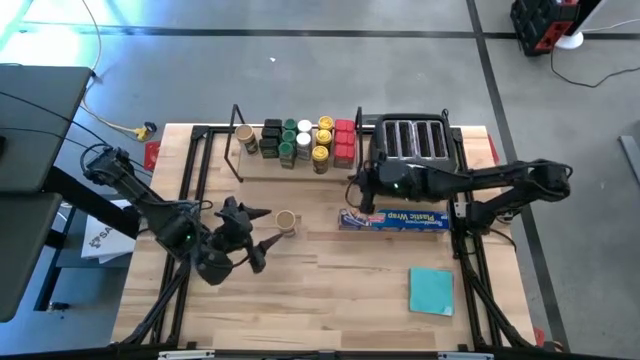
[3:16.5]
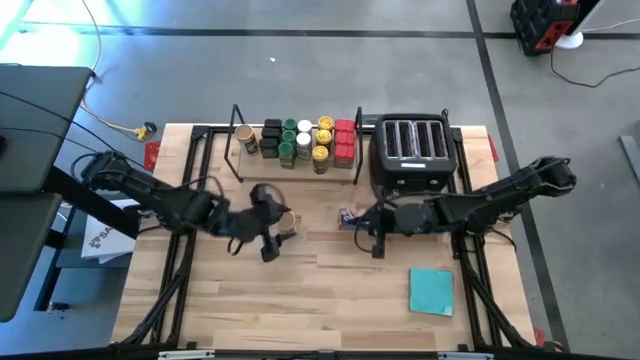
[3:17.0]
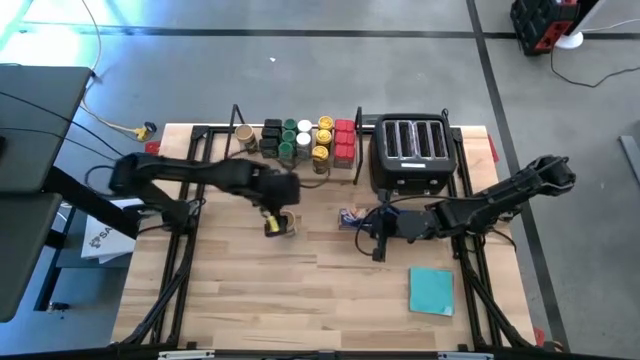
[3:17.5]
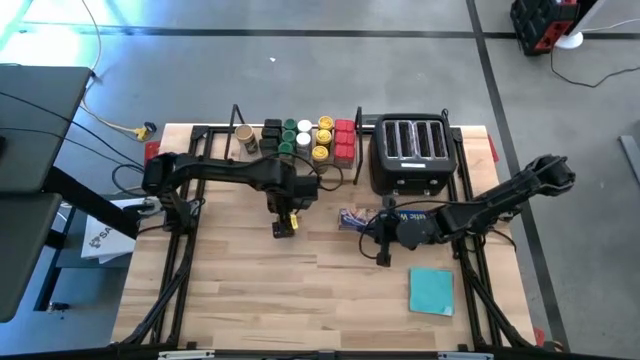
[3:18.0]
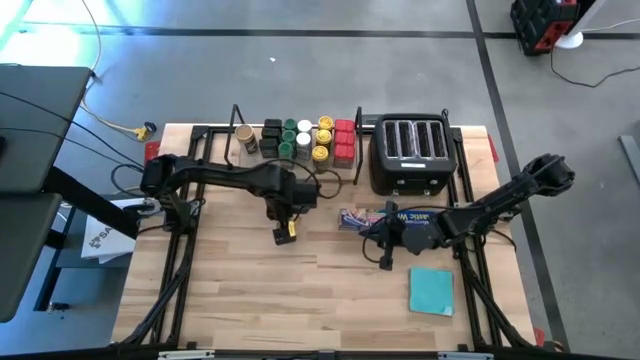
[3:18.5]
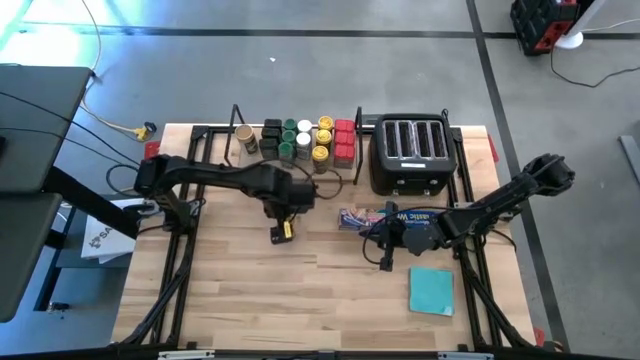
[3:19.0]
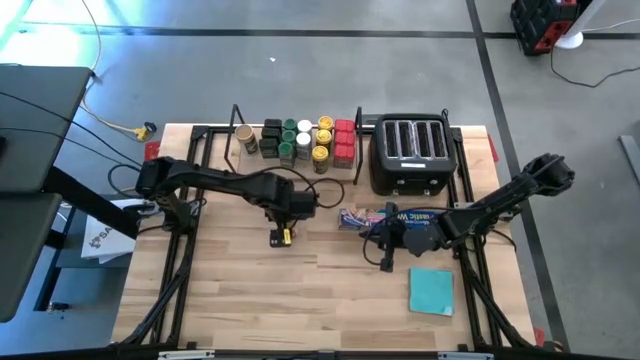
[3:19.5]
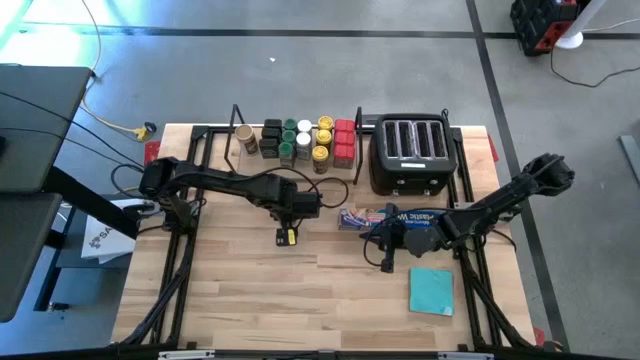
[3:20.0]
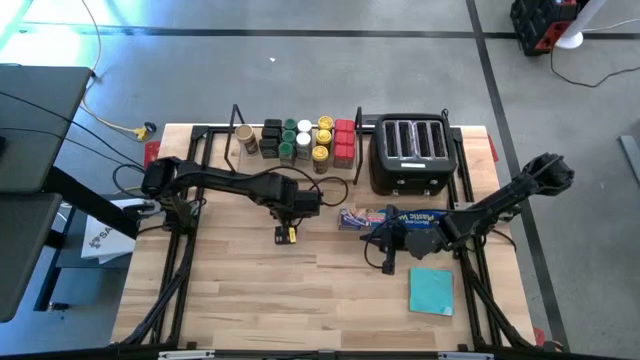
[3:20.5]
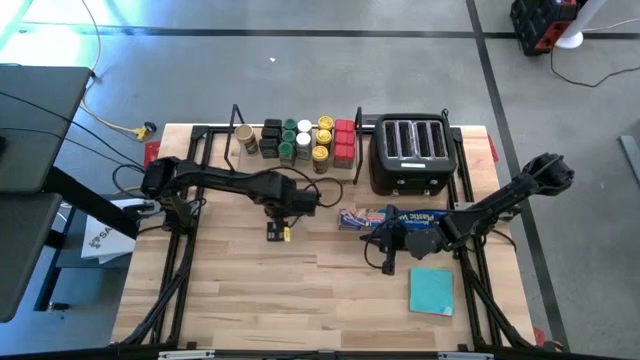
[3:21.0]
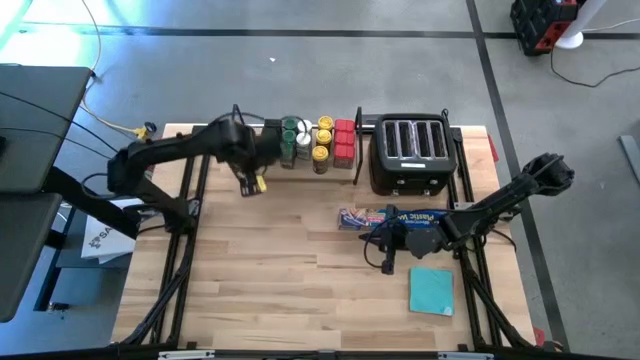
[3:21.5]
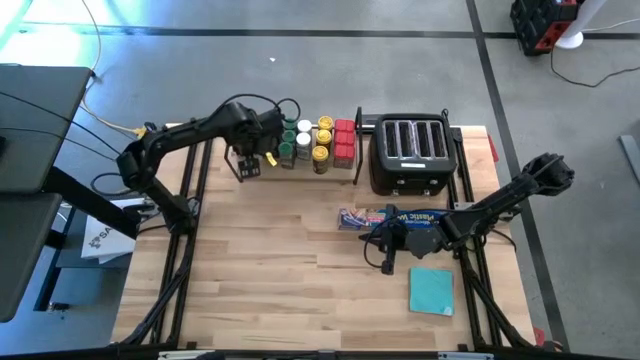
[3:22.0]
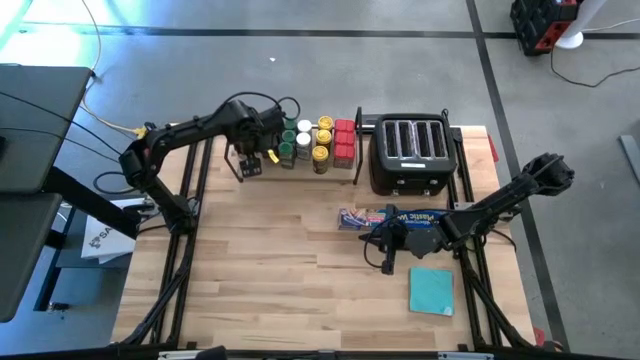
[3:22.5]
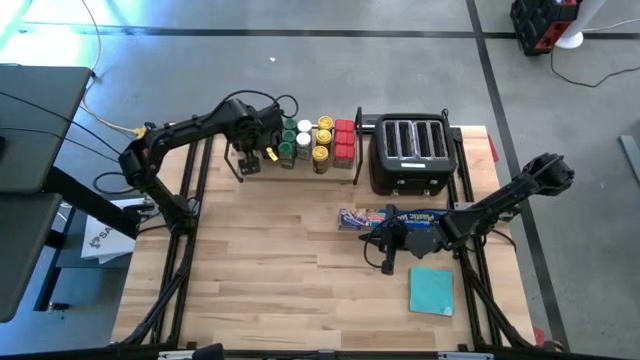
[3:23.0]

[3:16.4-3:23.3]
Task: Shelf spices
Put the gold seasoning bottle on the shelf aligned with the other gold seasoning bottles

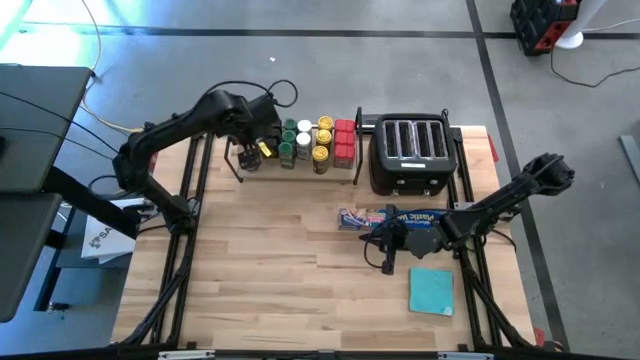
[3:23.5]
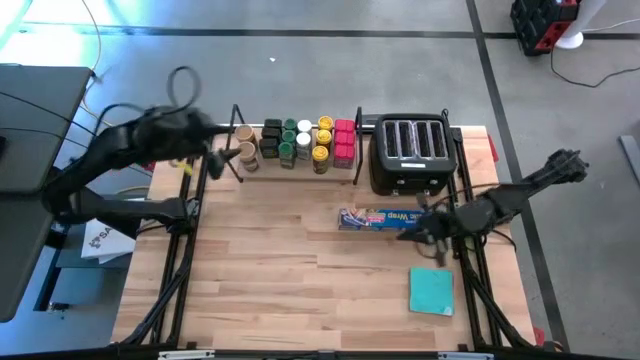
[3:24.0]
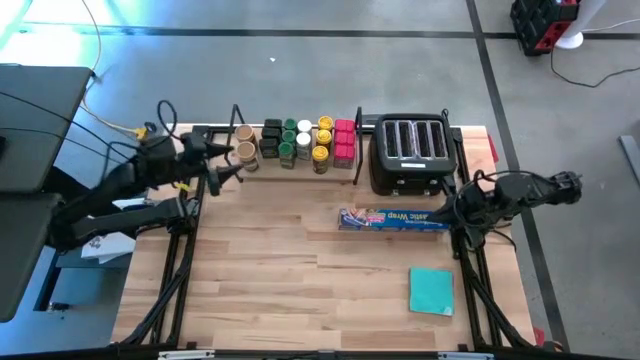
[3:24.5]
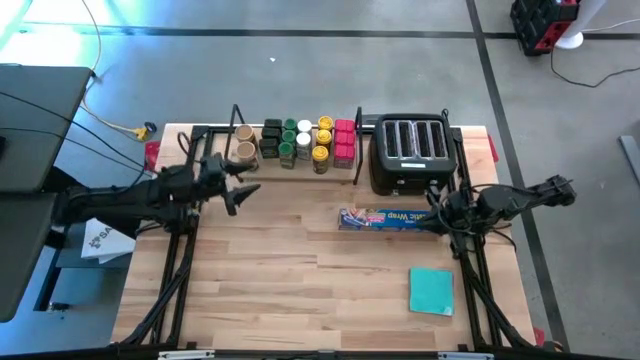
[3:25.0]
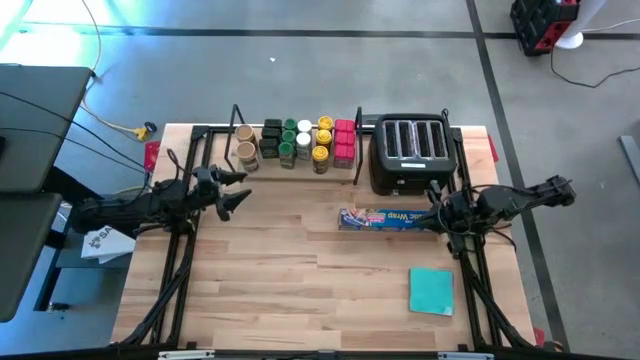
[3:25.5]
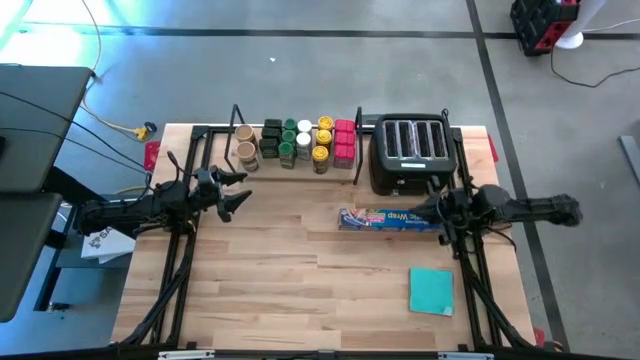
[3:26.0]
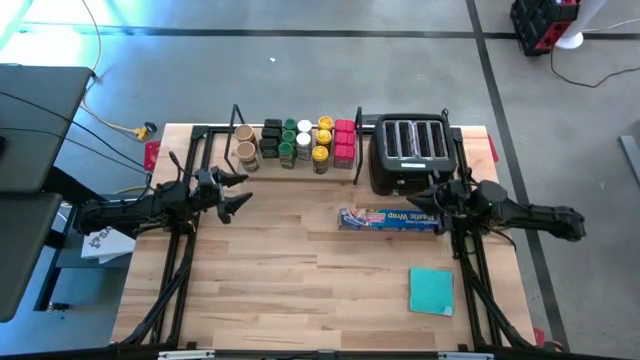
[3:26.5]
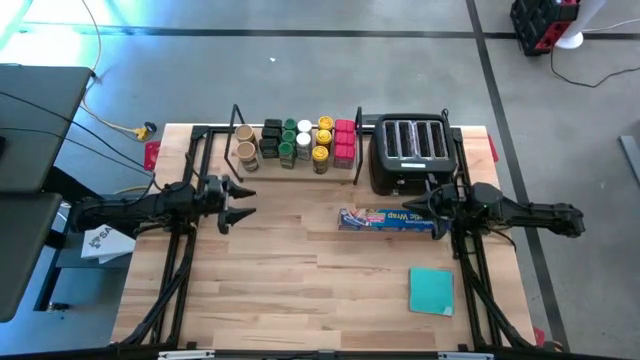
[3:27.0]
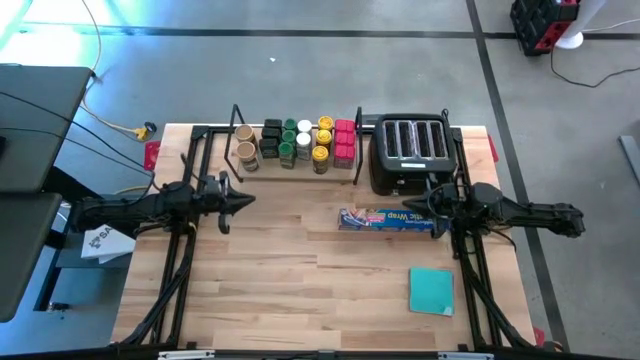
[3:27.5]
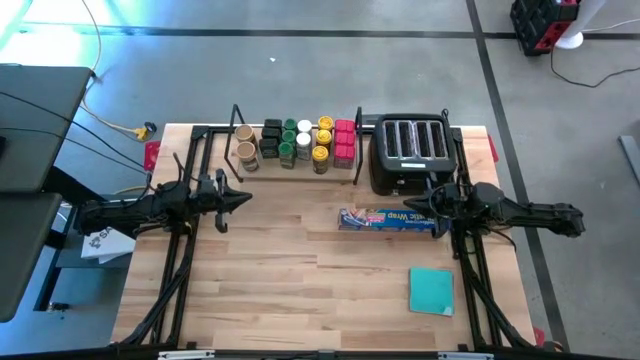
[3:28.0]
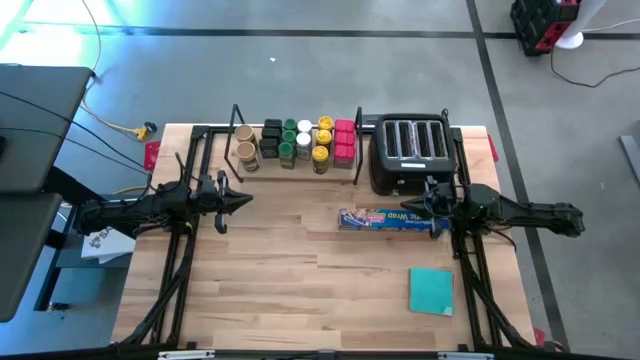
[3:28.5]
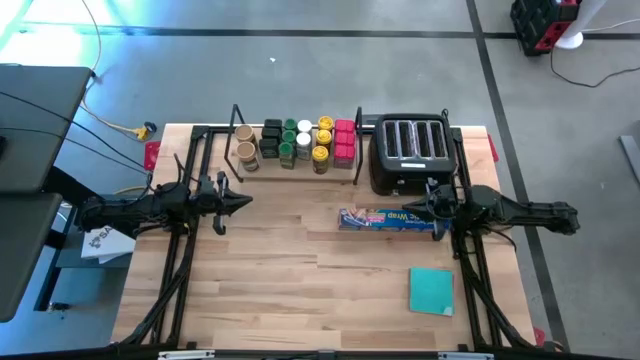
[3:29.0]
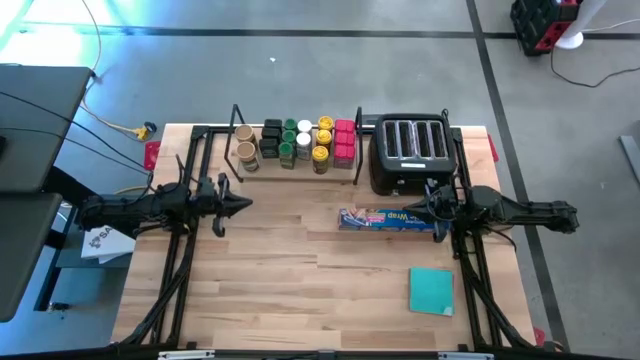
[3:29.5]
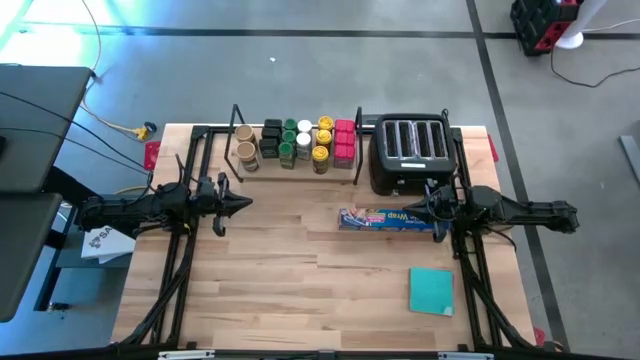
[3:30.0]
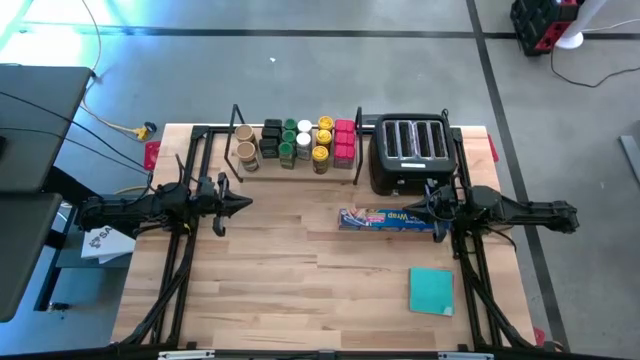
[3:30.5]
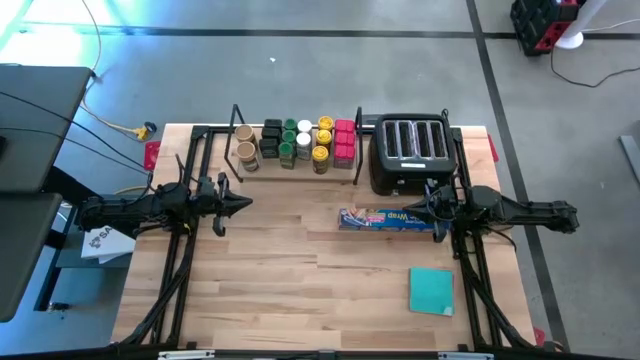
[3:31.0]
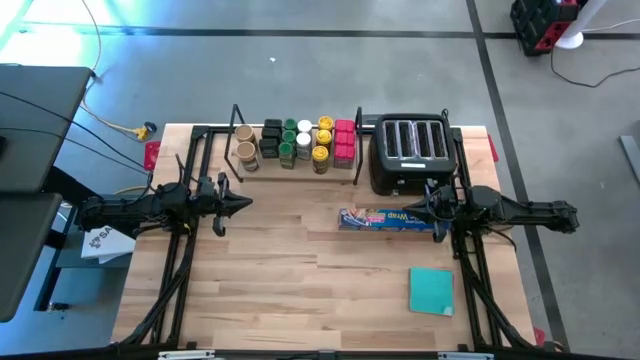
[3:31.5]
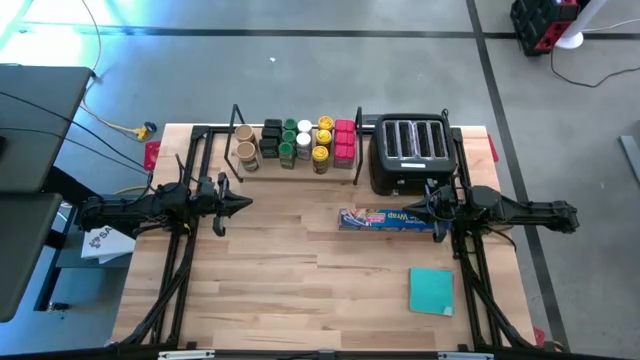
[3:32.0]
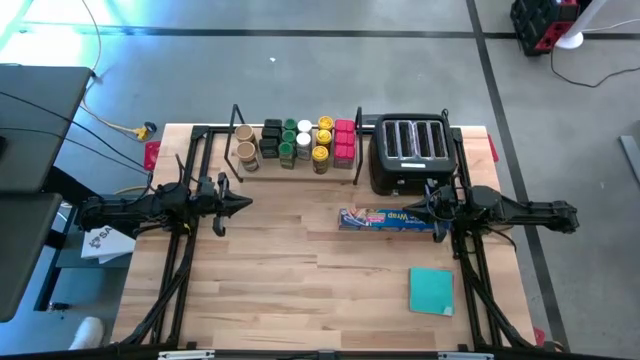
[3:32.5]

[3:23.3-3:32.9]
Return to Home Position

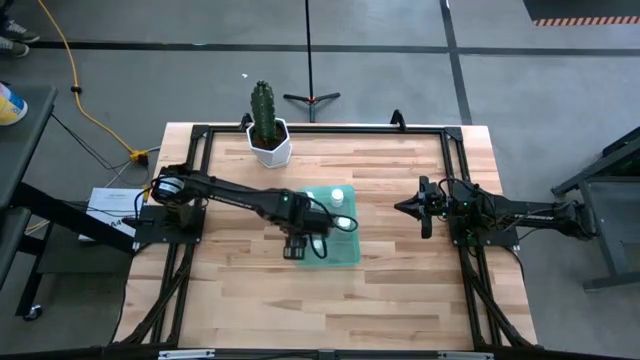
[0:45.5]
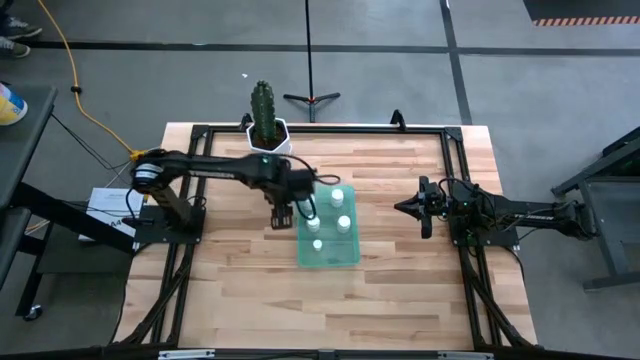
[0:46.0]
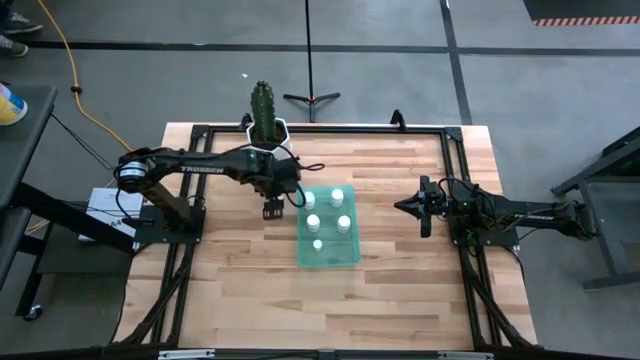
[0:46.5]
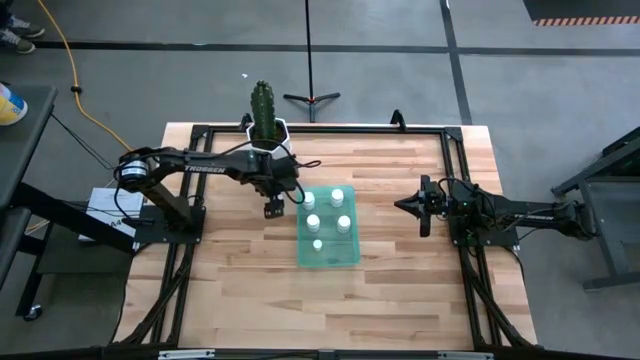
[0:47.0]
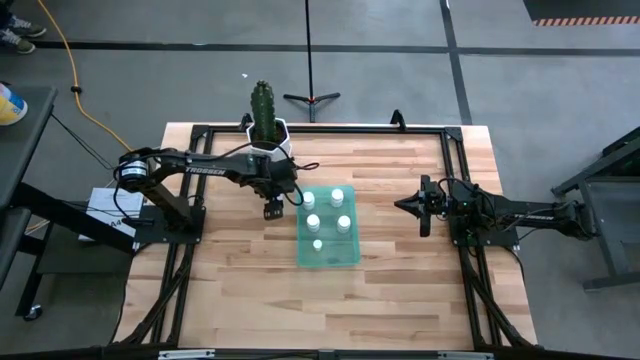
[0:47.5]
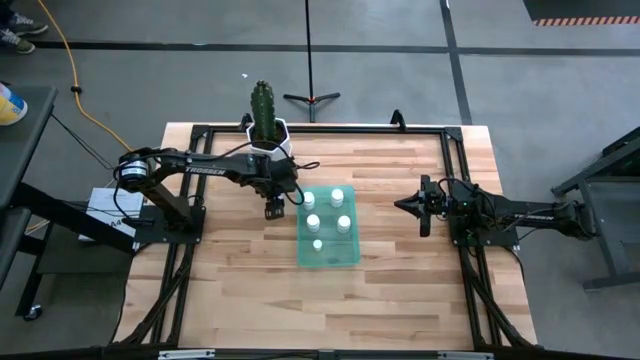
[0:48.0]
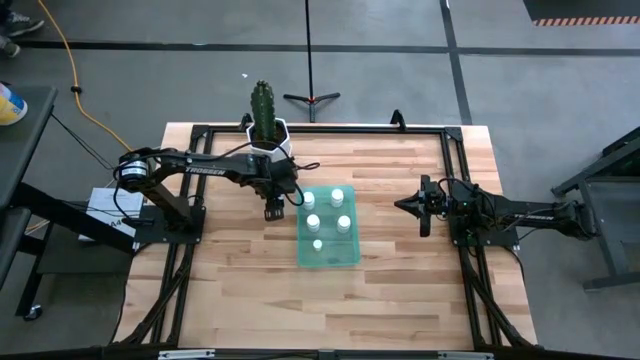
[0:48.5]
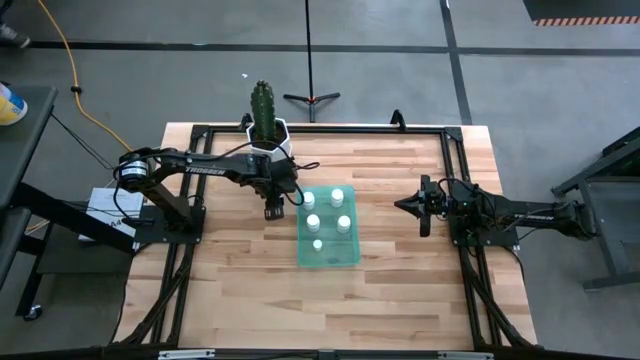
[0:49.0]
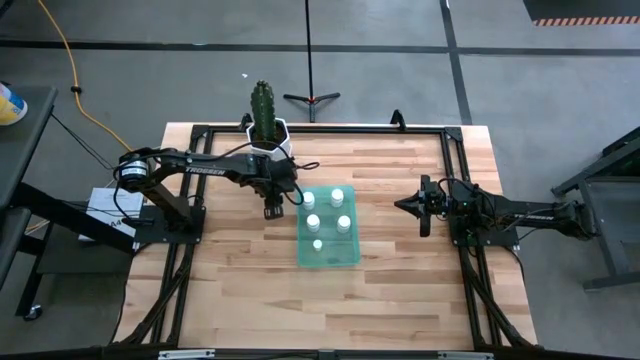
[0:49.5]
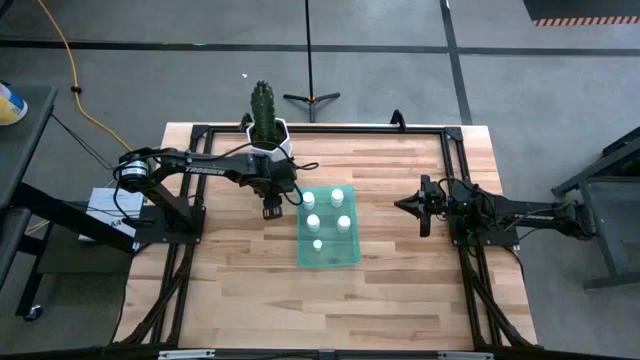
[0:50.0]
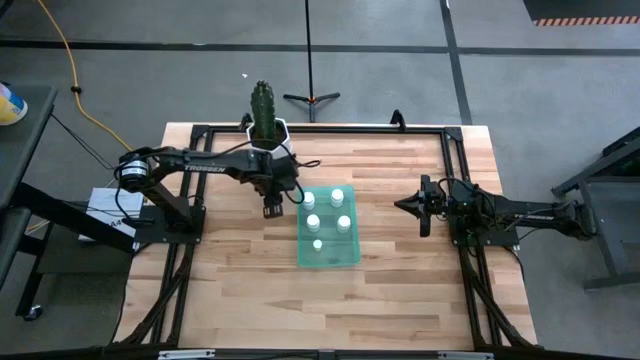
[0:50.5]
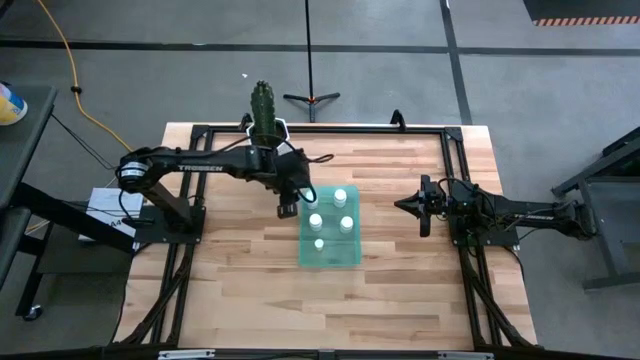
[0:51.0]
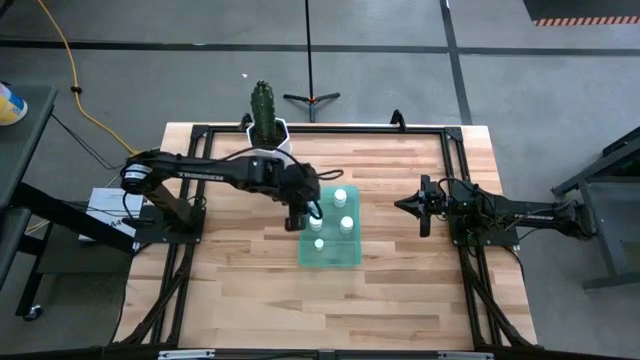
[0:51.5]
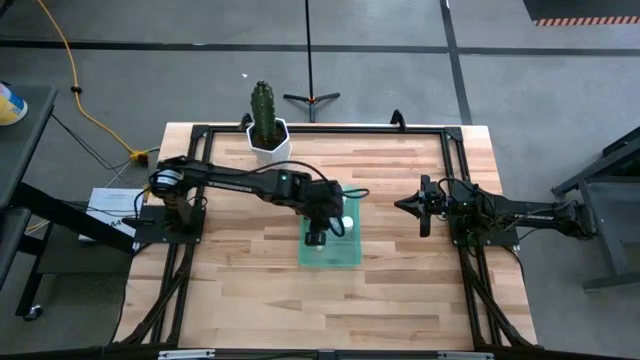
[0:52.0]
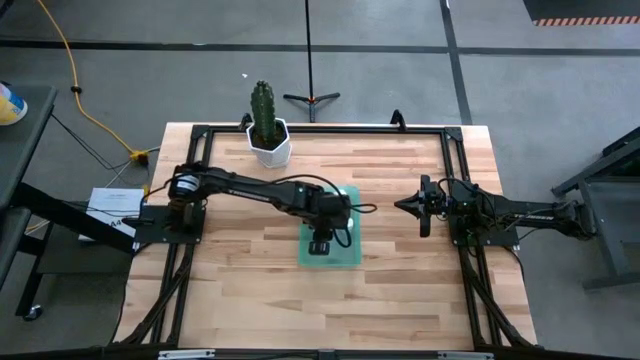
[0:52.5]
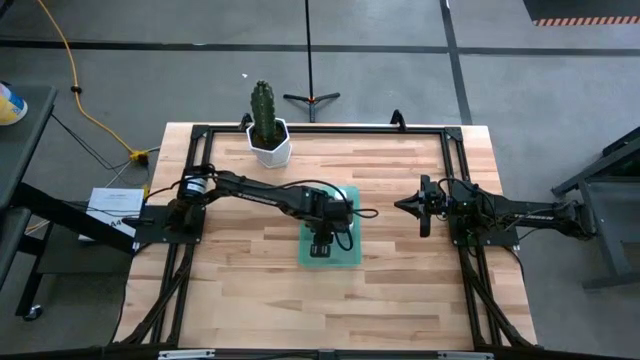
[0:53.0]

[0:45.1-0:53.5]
Task: Pick and place pill bottles into a basket
Put the blue pill bottle into the green bin
